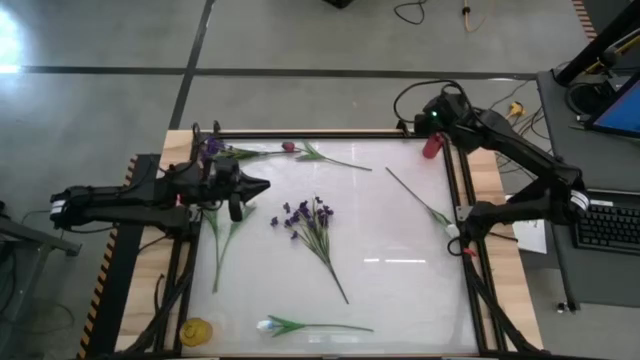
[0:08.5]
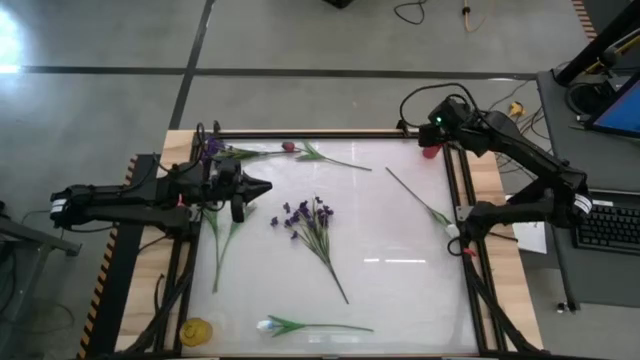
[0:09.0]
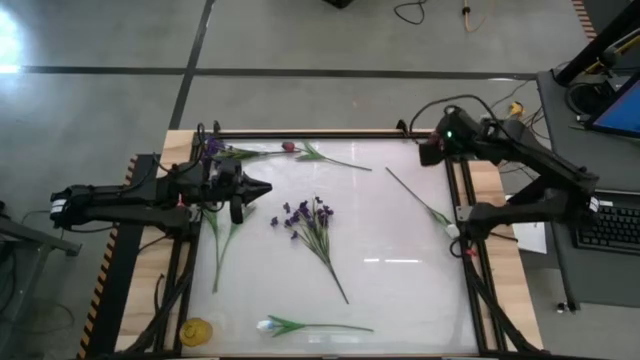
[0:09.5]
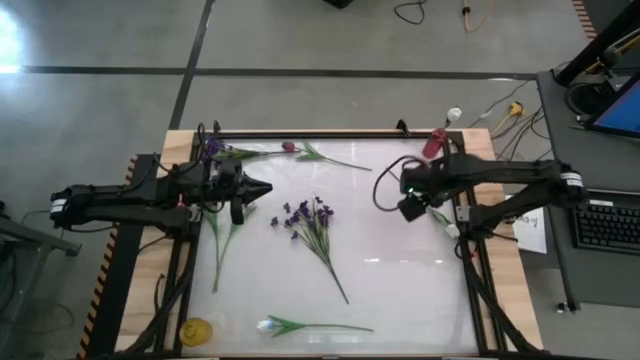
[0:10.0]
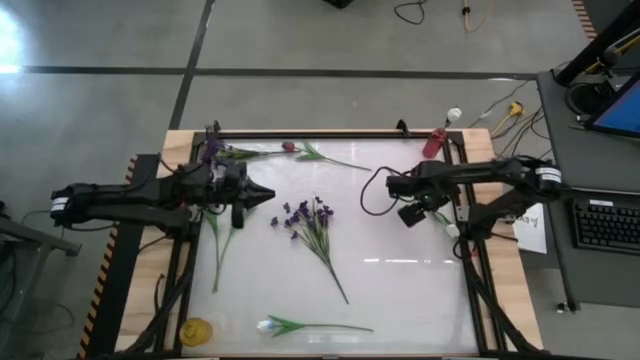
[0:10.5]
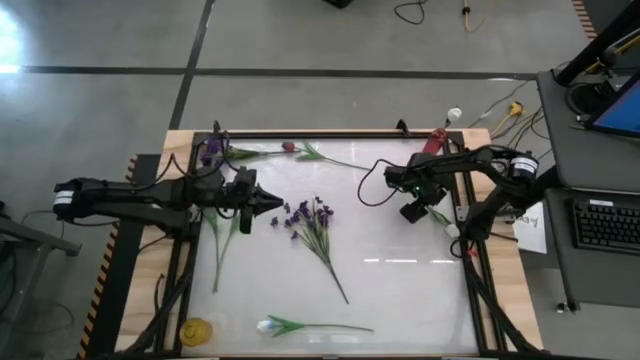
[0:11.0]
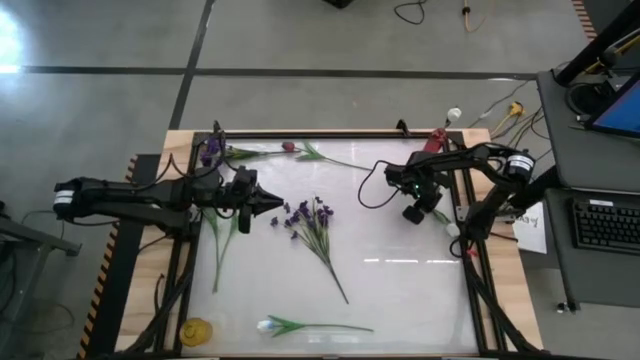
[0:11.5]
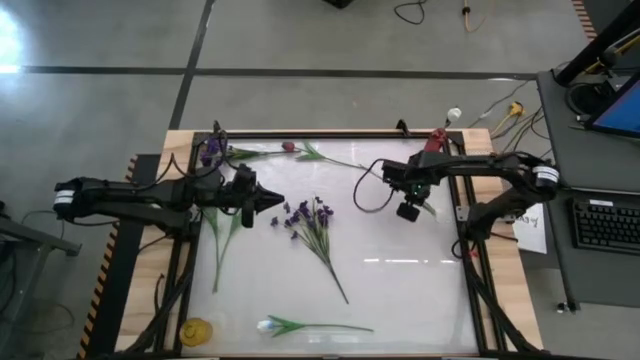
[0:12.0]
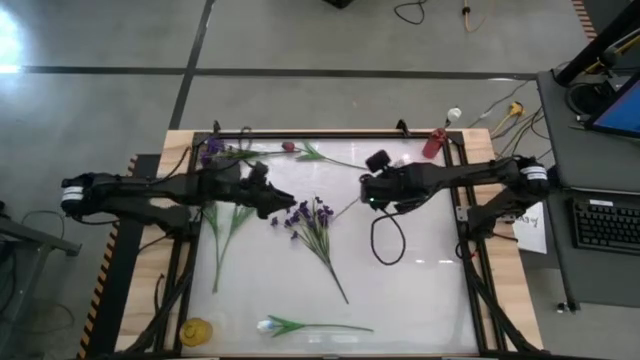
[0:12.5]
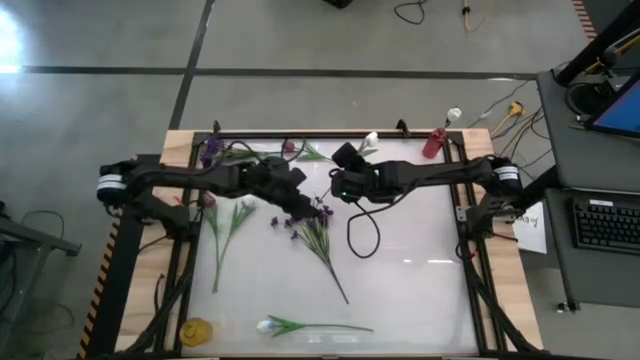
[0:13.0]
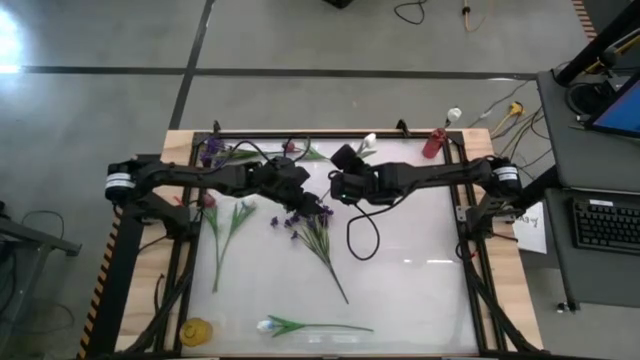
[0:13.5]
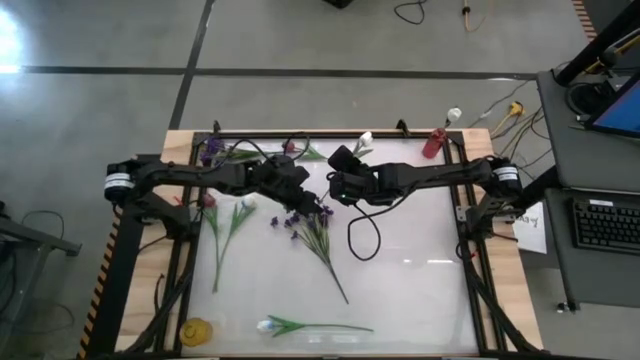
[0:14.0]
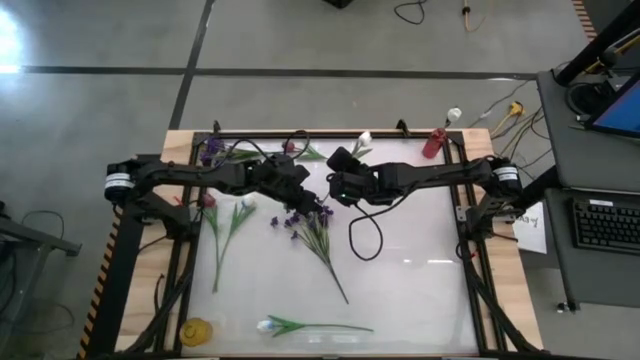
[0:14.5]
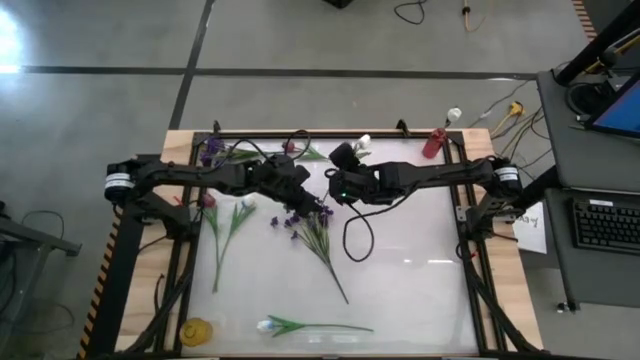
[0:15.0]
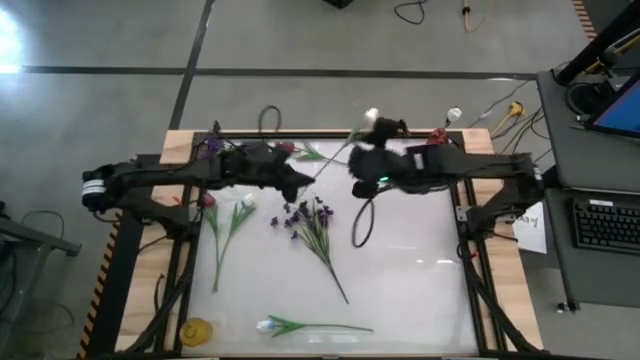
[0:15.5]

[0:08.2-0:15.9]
Task: Sort flowers into vase by color
Put the top right white tulip into the red flower vase

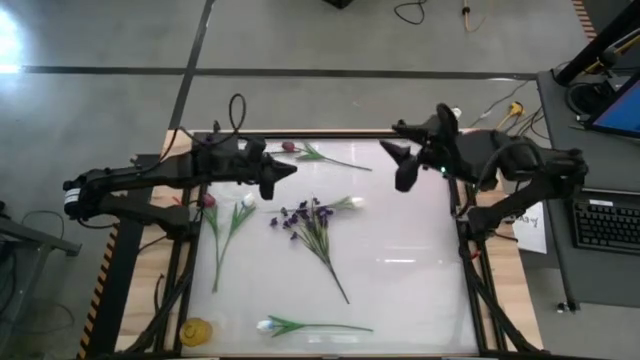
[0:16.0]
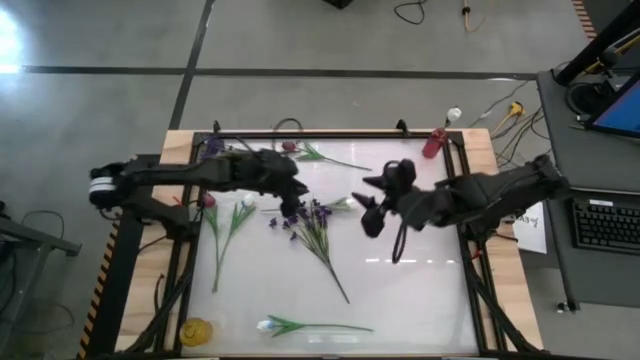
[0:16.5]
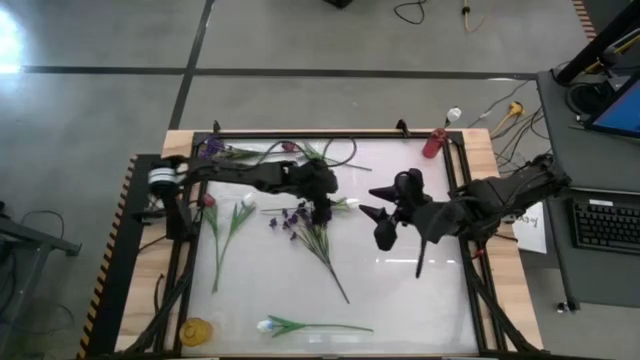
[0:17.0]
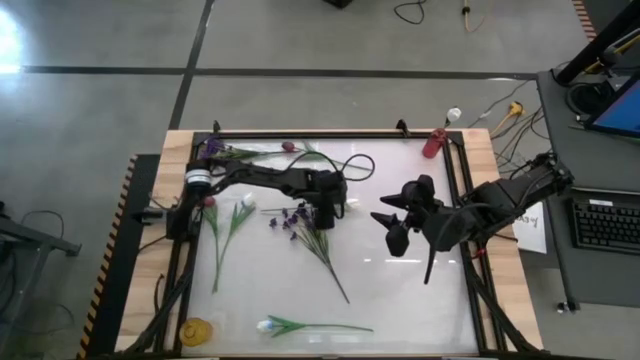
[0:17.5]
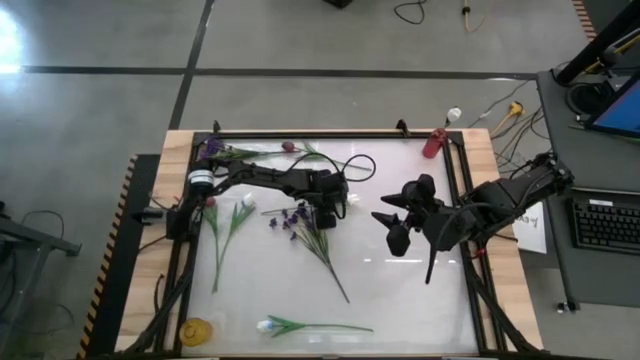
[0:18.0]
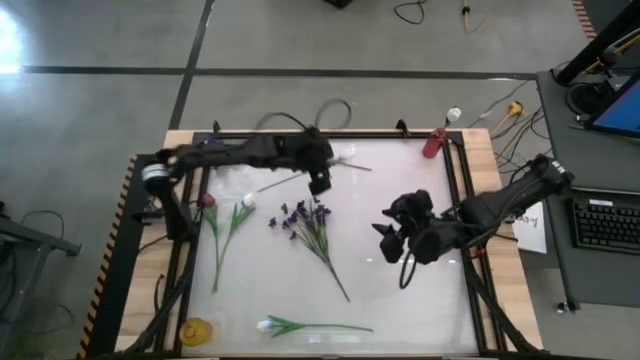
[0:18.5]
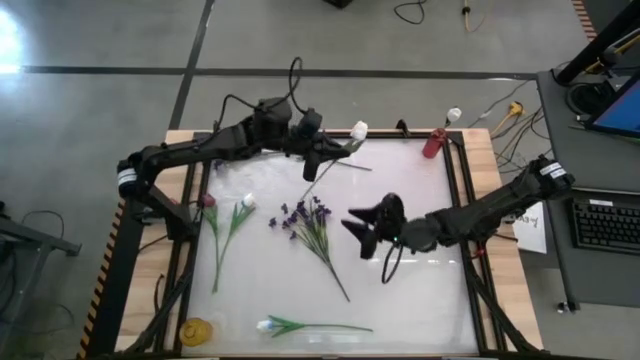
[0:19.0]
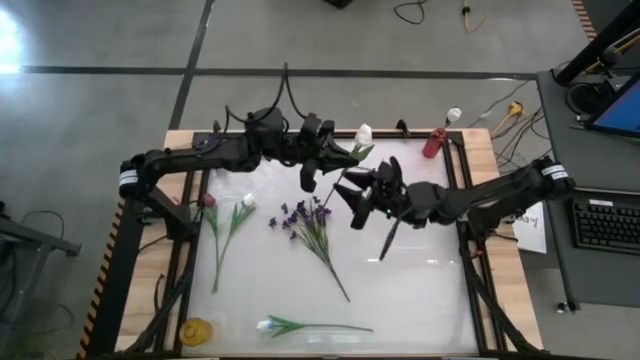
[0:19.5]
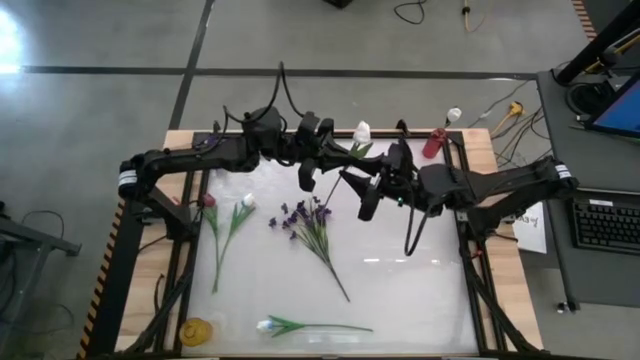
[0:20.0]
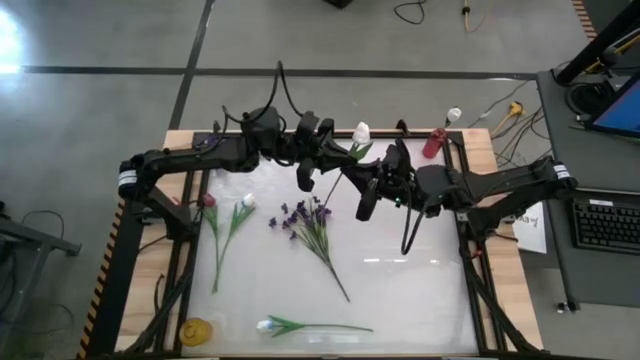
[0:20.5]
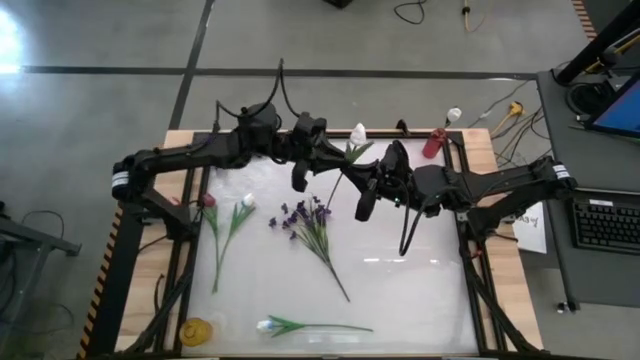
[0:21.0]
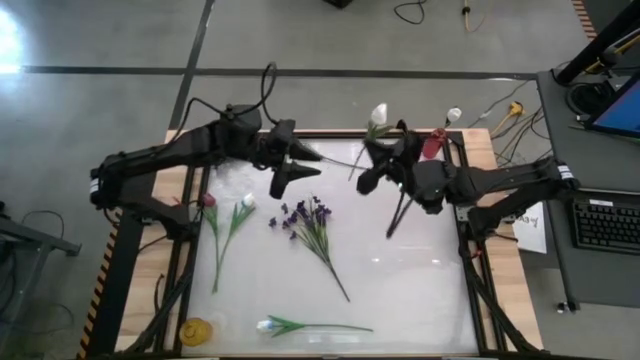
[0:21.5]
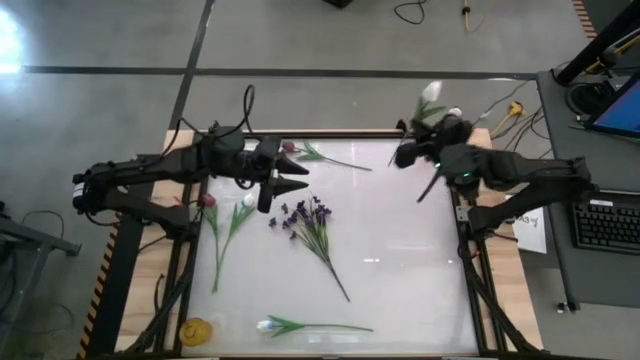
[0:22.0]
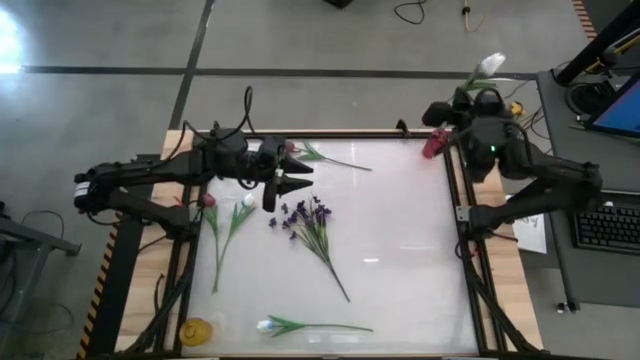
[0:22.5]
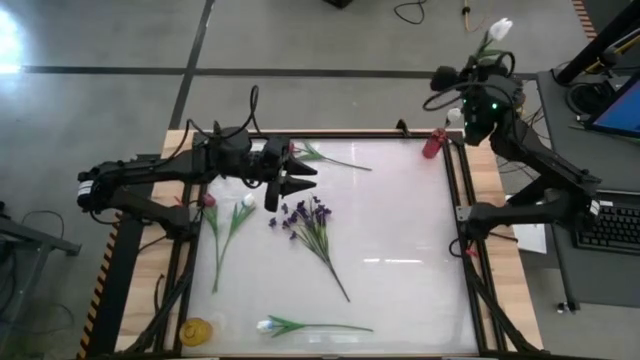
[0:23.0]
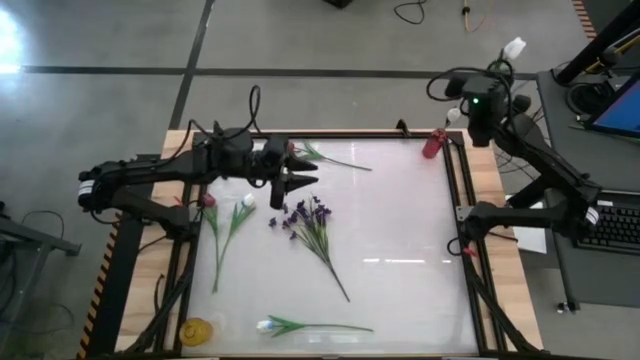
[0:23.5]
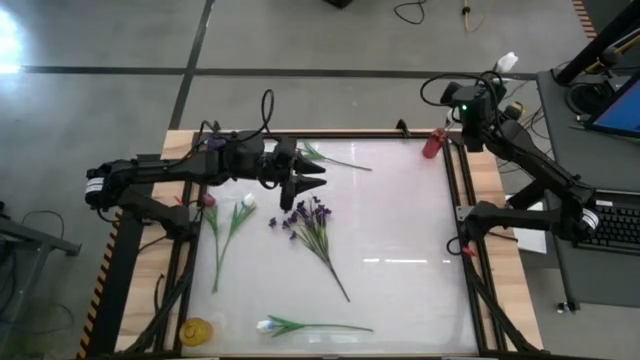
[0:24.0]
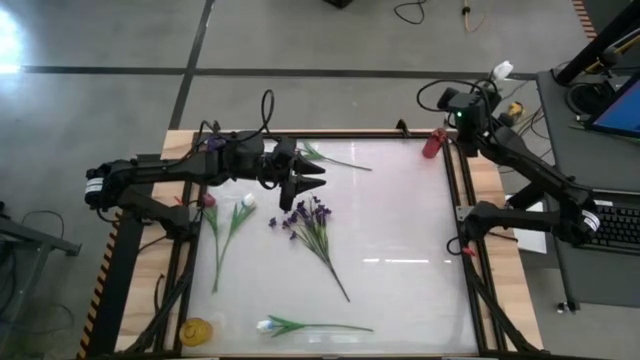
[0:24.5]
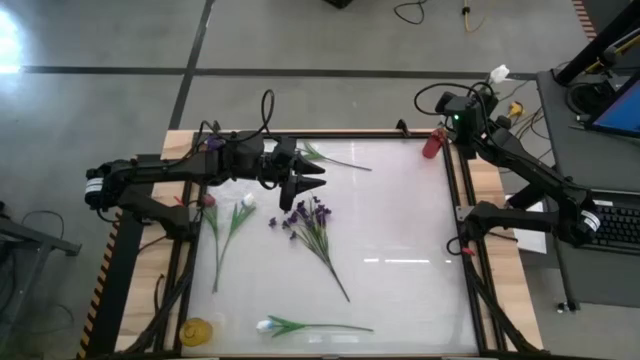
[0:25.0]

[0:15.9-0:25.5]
Put the top right white tulip into the red flower vase

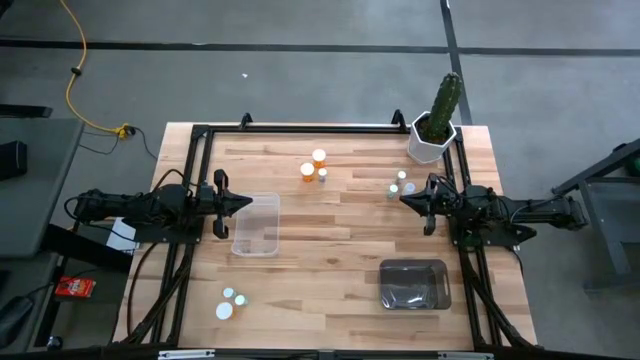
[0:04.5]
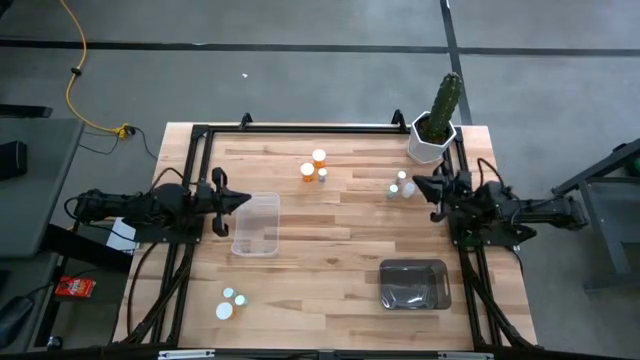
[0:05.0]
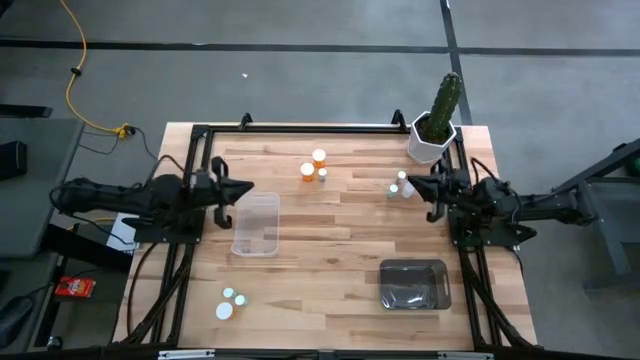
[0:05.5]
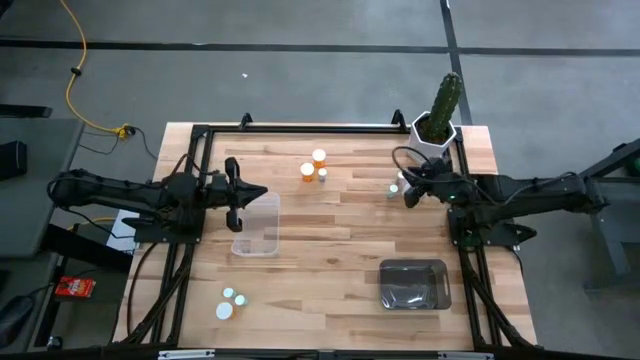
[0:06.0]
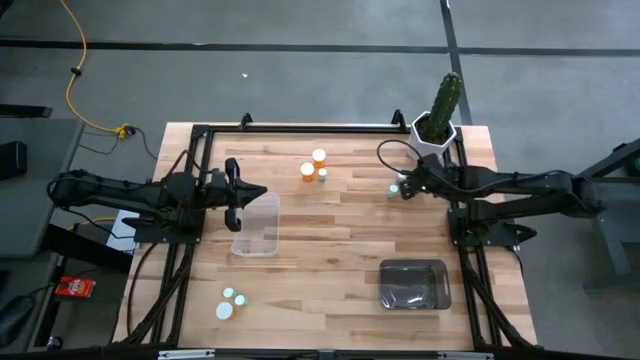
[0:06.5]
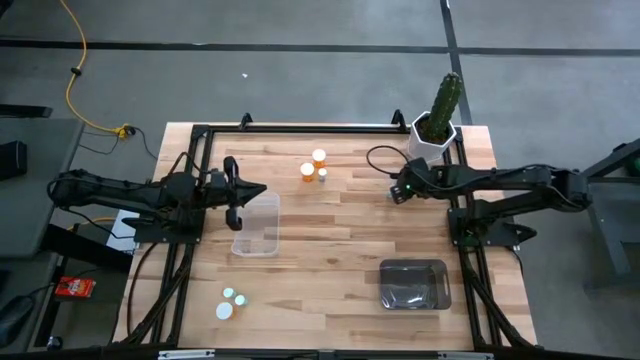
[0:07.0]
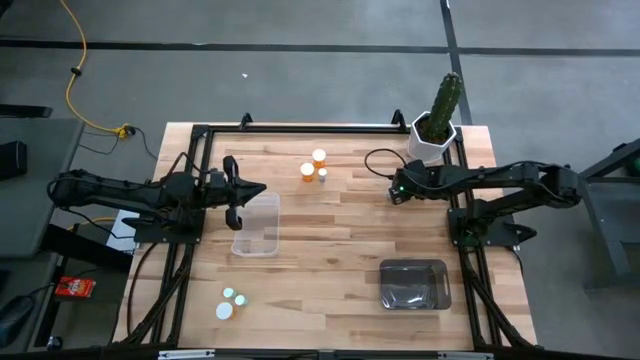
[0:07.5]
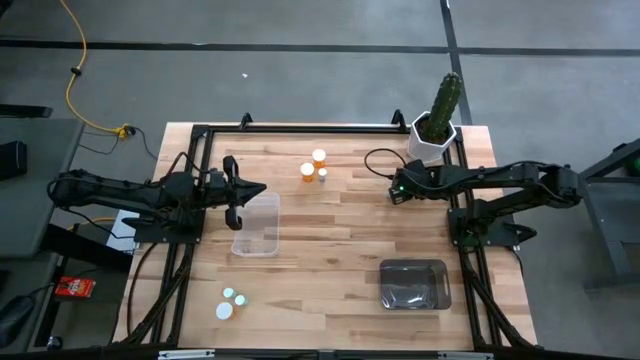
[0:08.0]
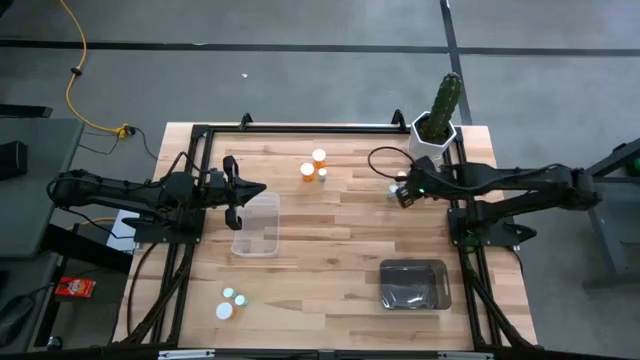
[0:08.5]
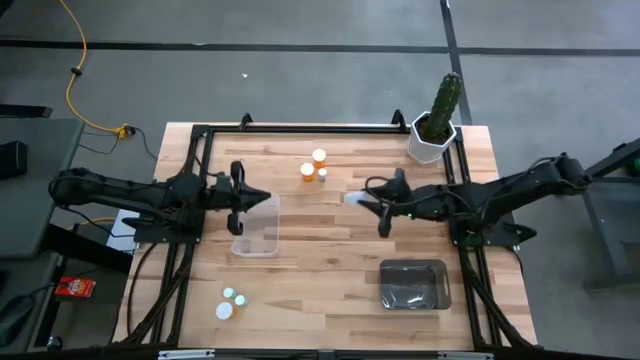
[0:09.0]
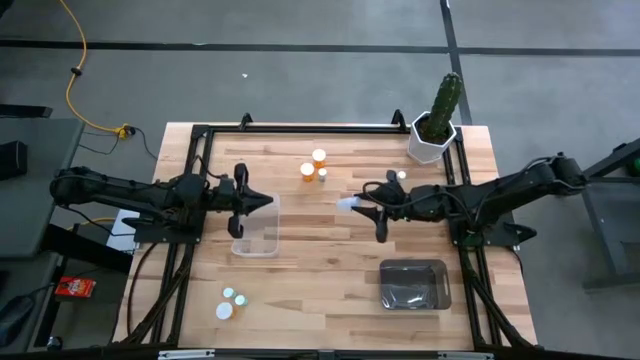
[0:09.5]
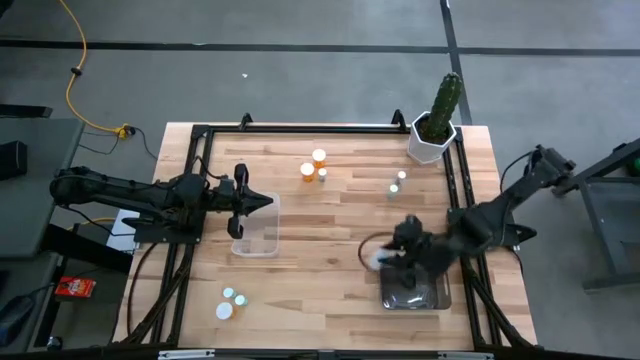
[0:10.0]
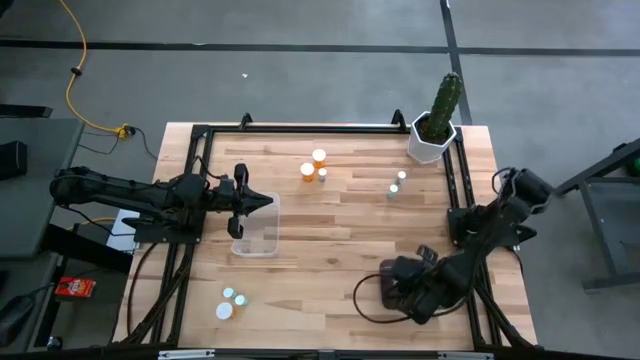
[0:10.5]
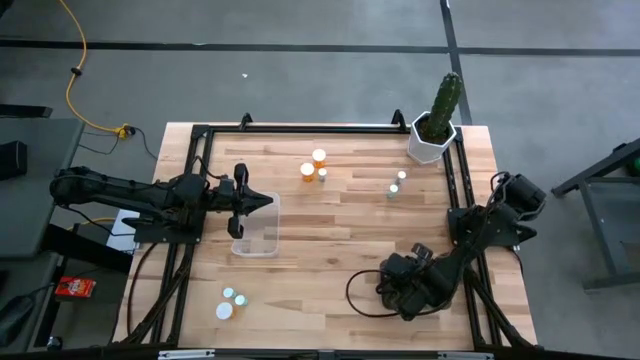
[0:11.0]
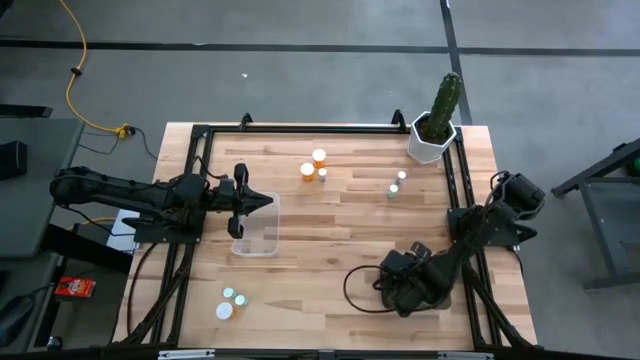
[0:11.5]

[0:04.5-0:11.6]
Task: Pick and place medicine bottles into bin by pill shape (circle, oval)
Put the transparent tablet bottle into the black bin
